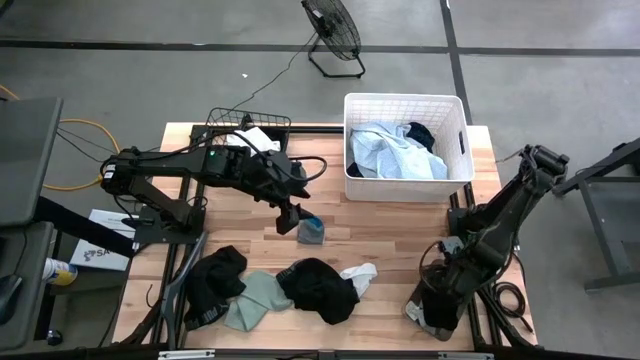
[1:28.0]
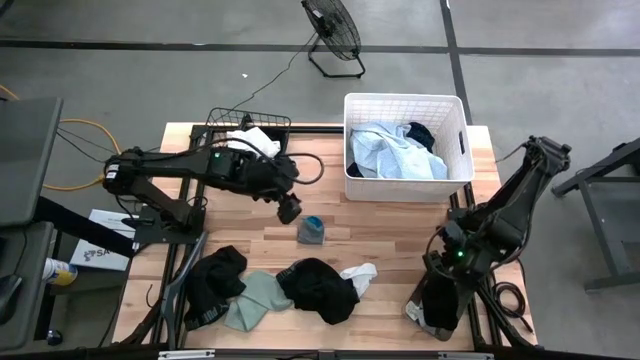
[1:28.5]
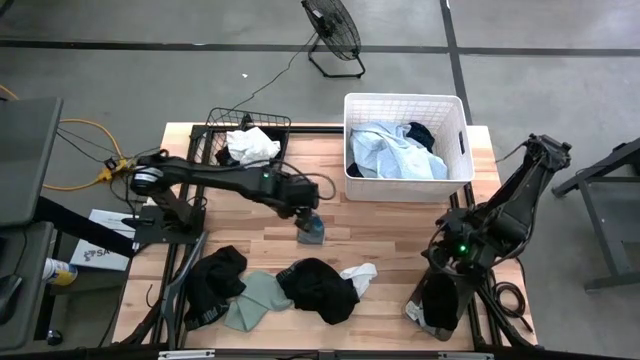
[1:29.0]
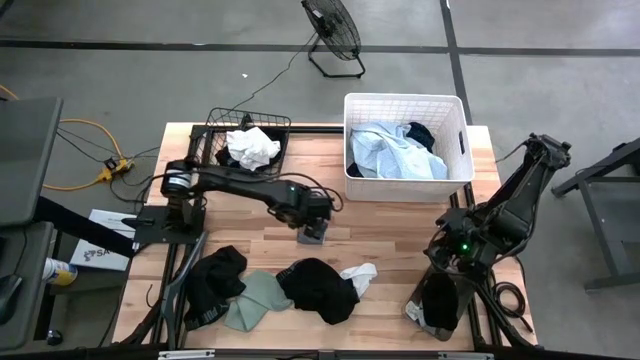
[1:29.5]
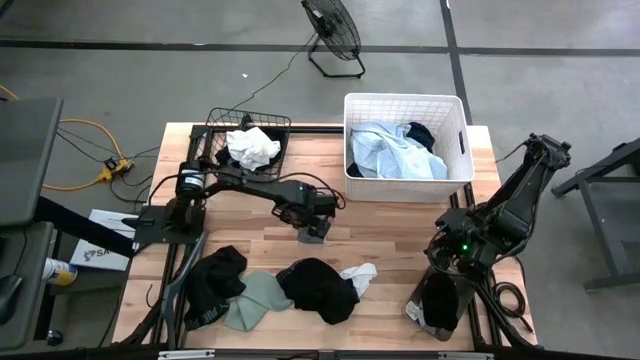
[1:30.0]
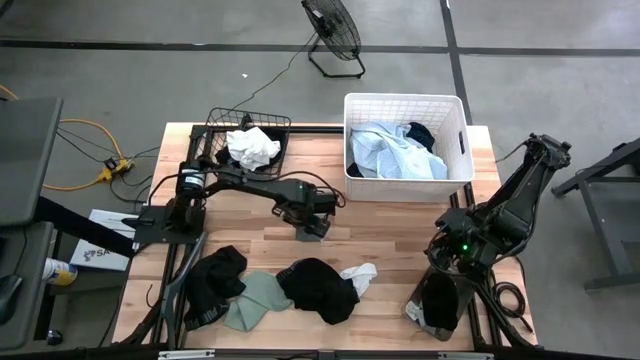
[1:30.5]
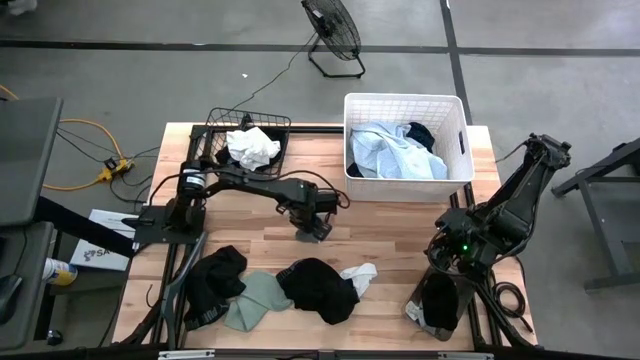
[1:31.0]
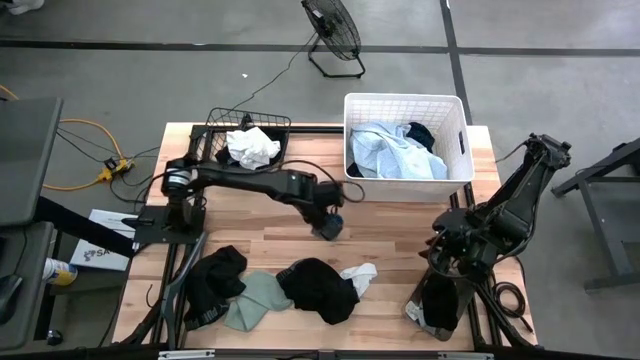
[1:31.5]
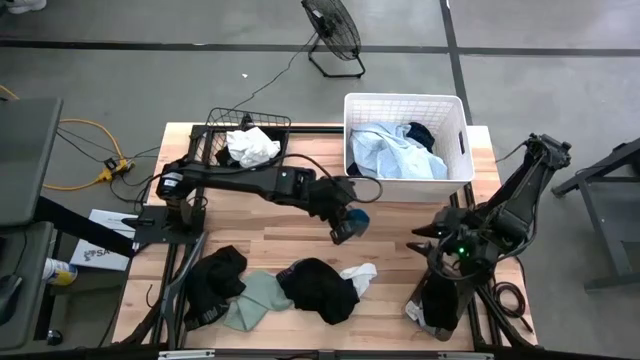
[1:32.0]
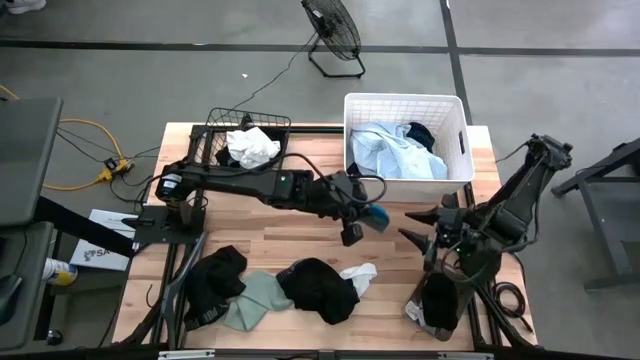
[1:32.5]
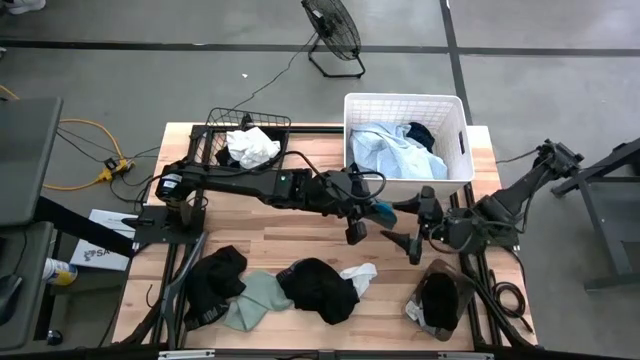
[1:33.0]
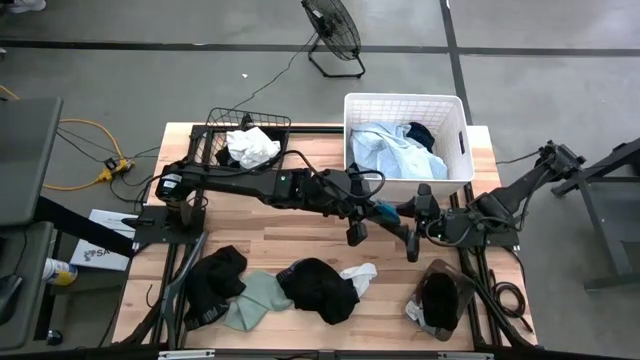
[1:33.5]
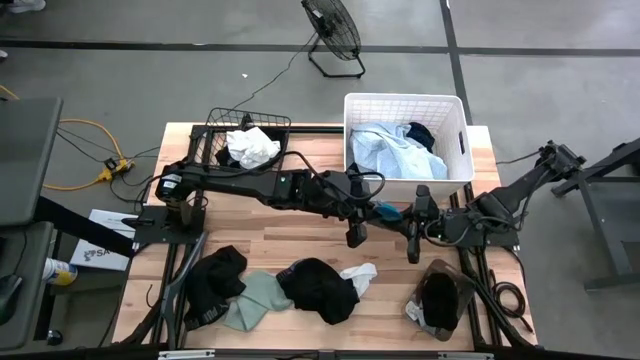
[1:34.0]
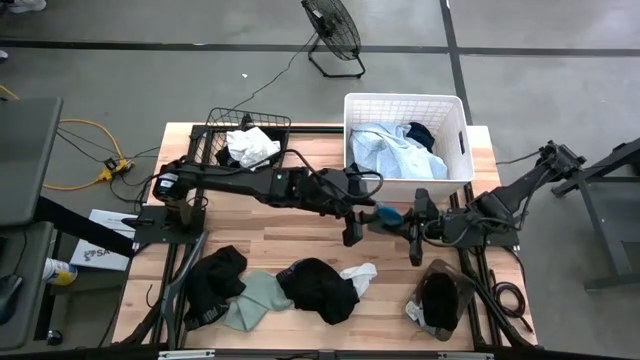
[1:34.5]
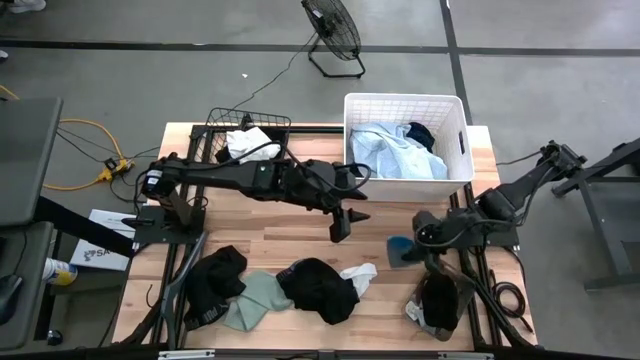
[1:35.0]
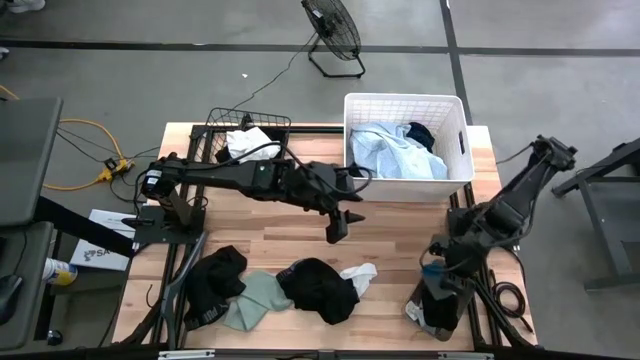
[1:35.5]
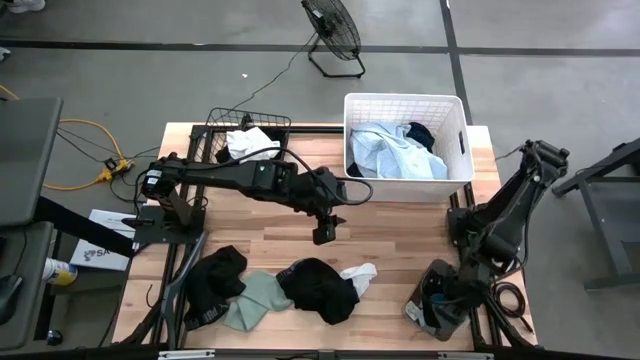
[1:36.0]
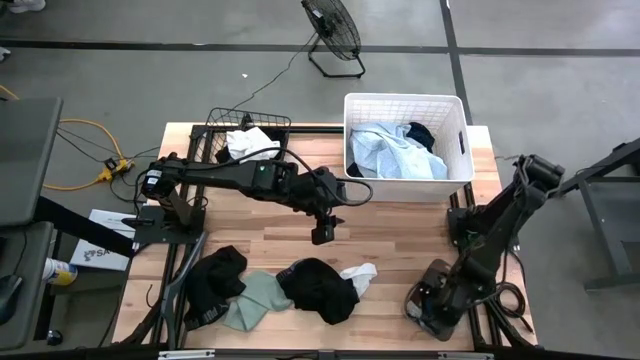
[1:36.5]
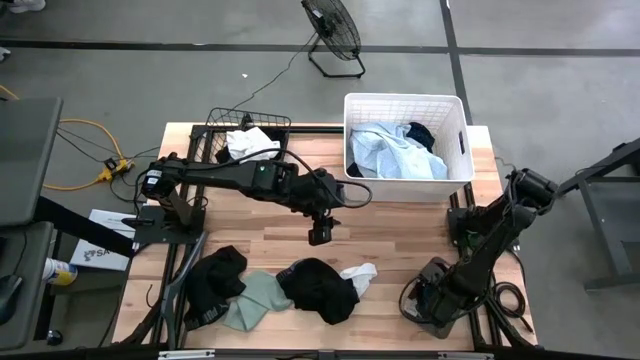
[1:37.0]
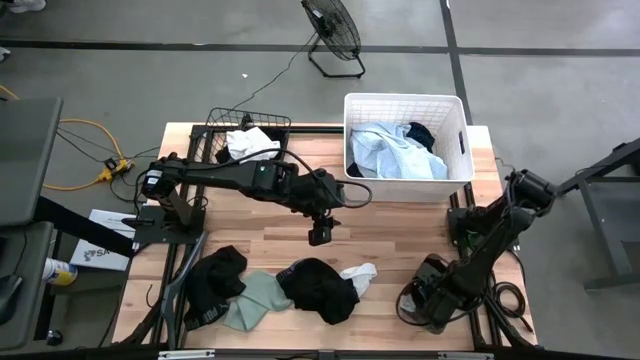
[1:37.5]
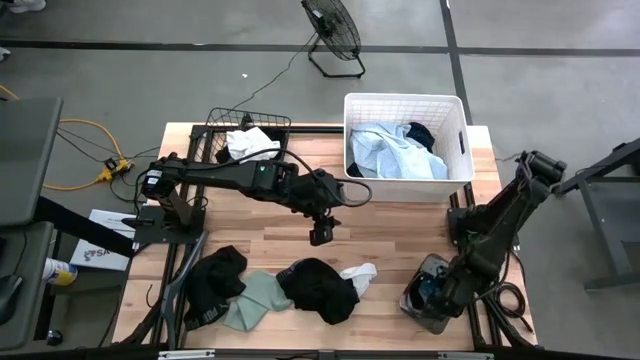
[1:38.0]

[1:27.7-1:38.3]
Task: Pick & Place Cloths
Put the blue gray sock into the black bin

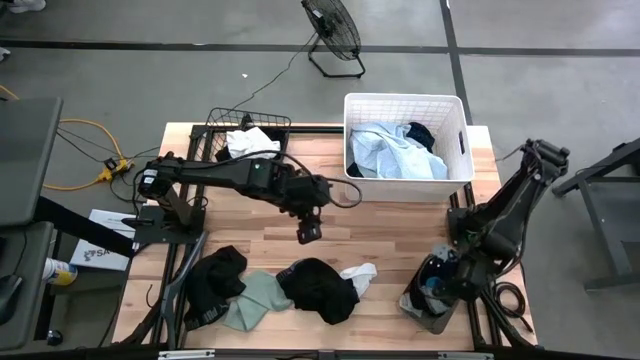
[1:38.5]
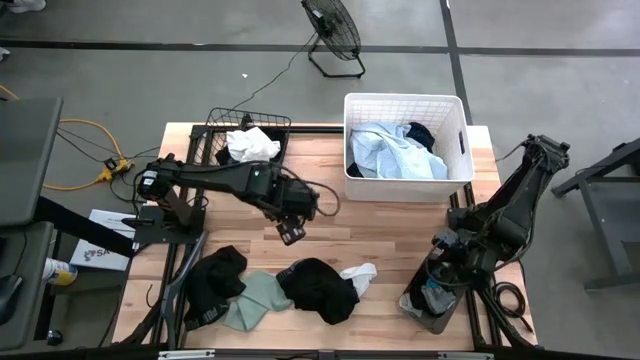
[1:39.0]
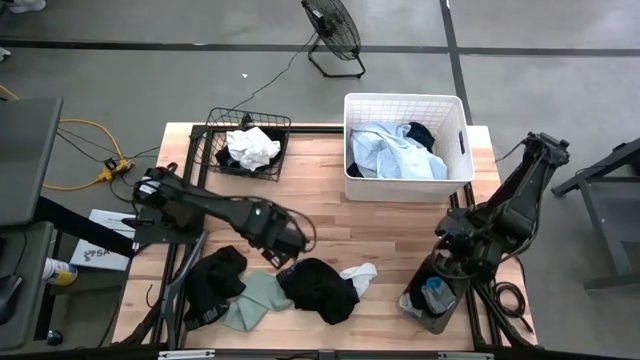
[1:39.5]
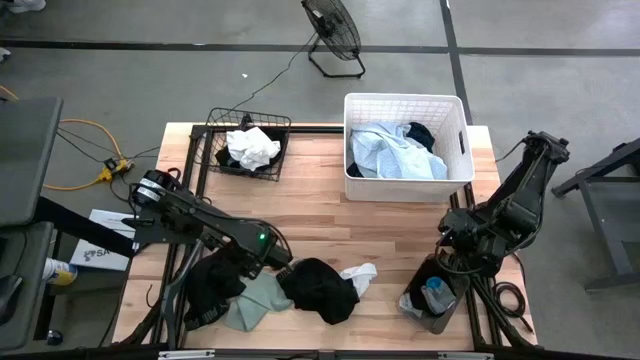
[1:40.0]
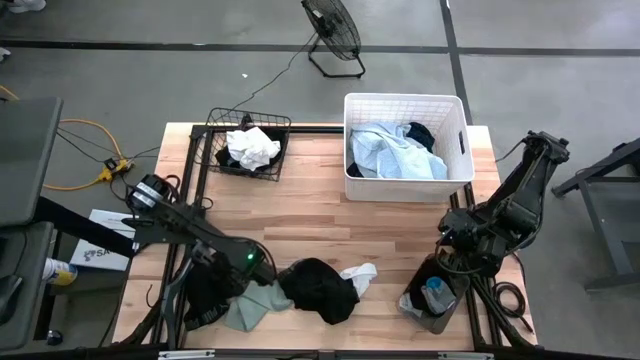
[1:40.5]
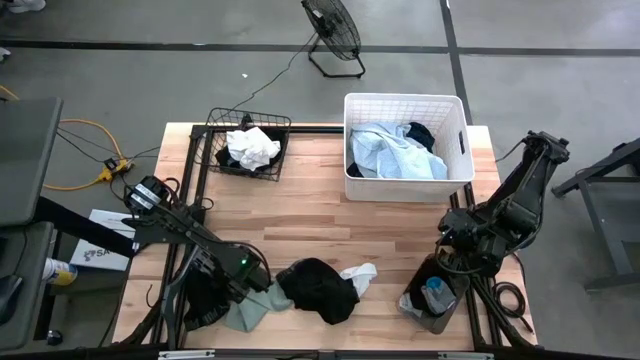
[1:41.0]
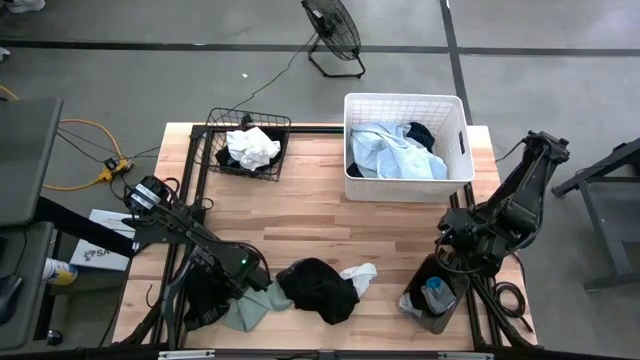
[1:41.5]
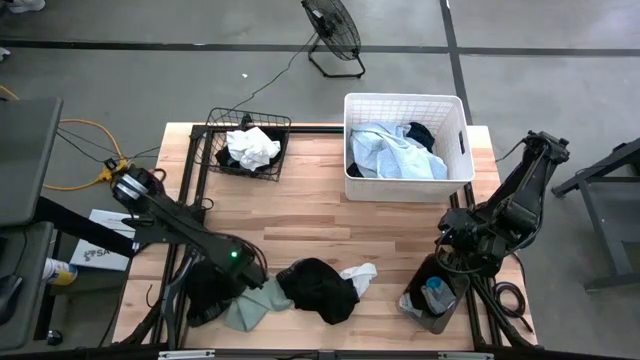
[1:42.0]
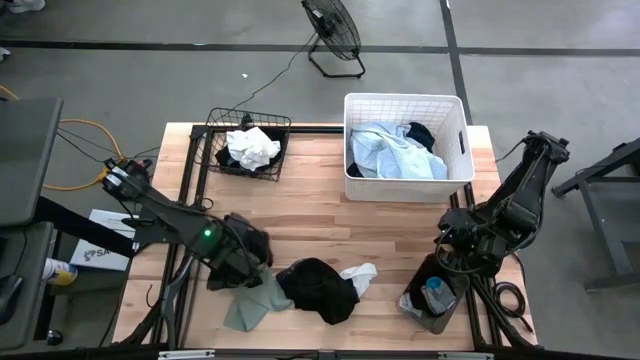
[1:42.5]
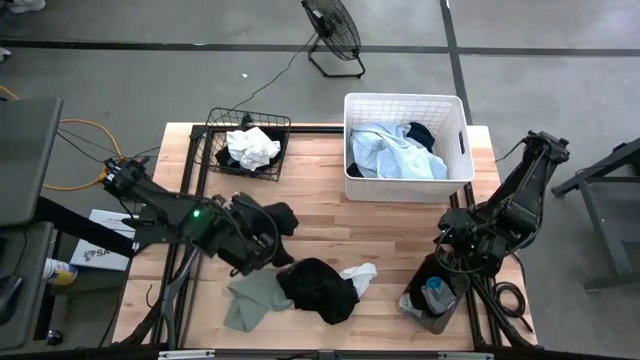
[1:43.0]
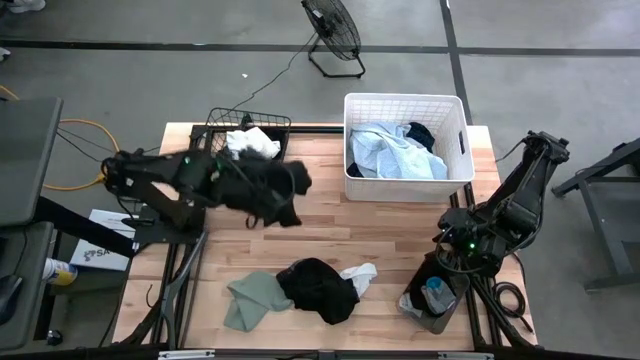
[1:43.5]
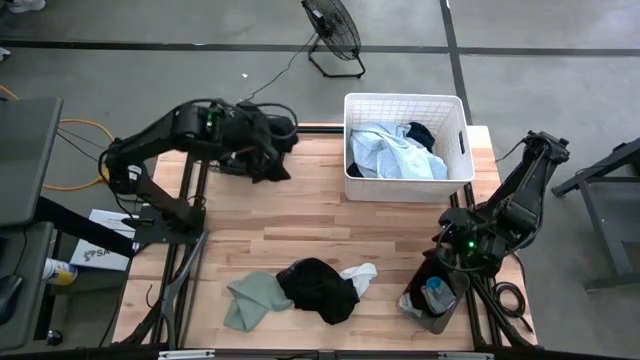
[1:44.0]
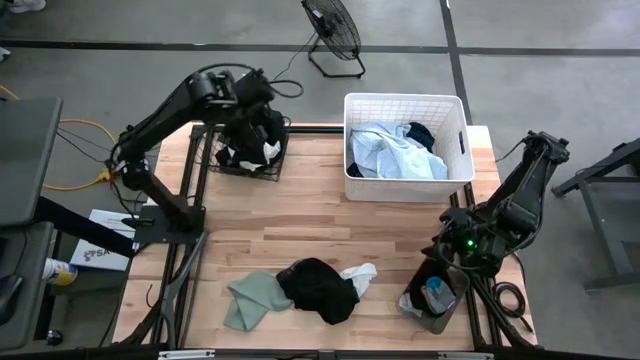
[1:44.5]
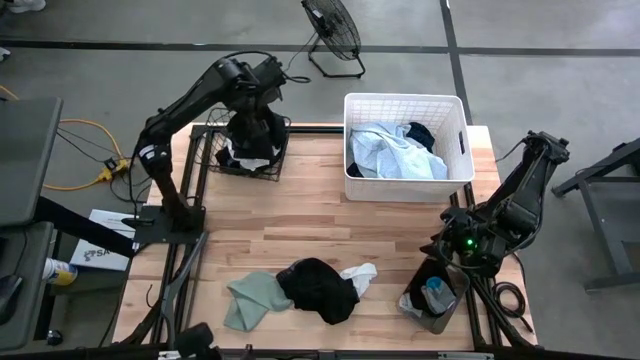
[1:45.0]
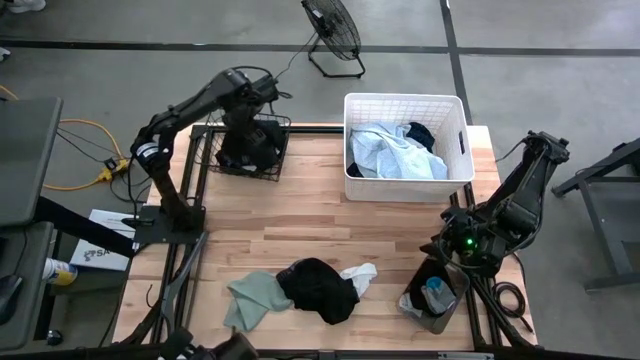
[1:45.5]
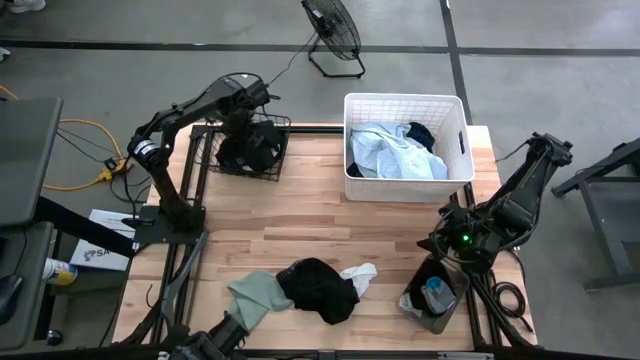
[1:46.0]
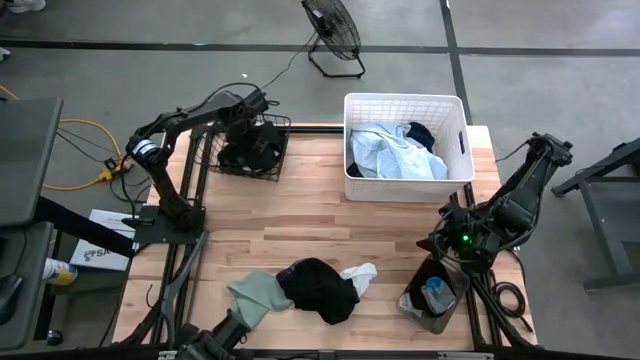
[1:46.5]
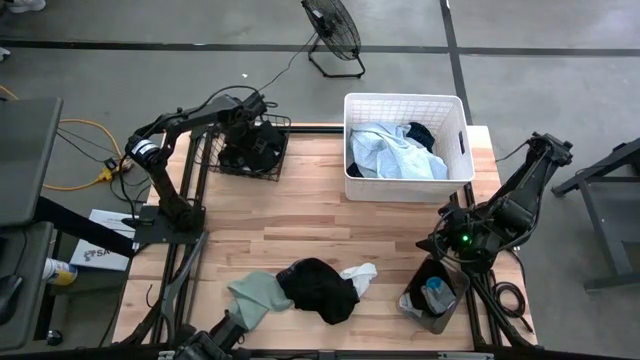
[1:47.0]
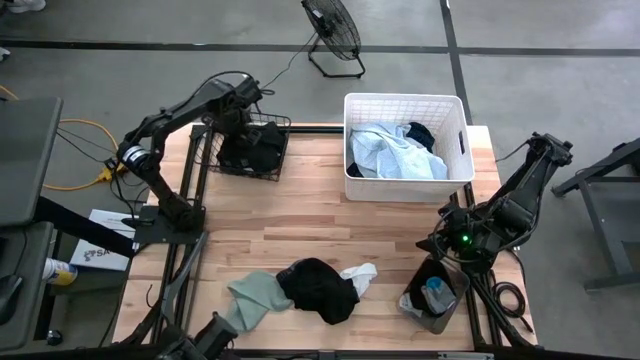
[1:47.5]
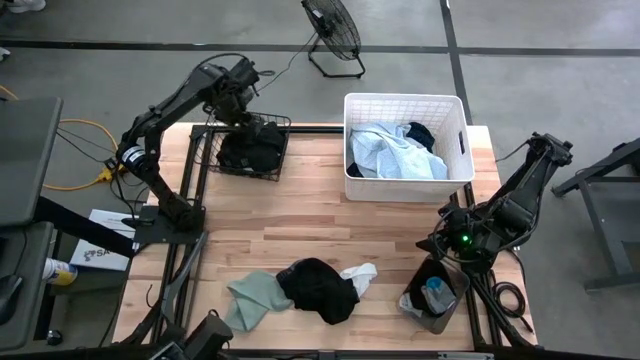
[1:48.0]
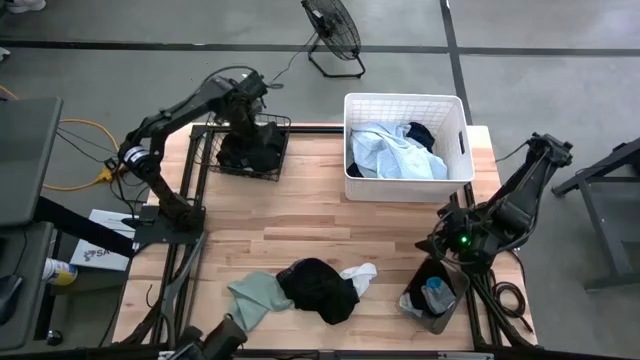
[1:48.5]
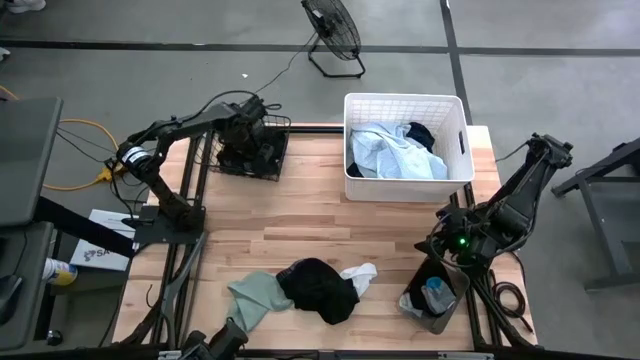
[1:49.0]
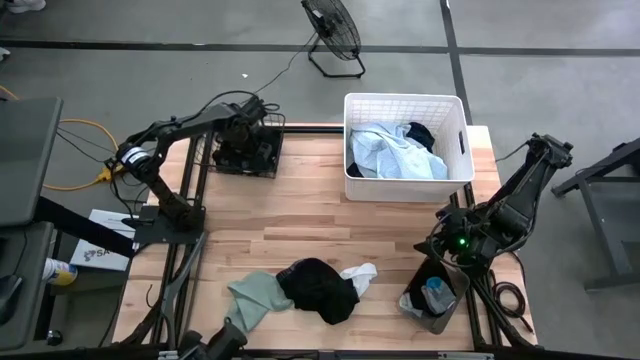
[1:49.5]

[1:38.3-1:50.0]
Put the left black boxer shorts into the black wire basket
